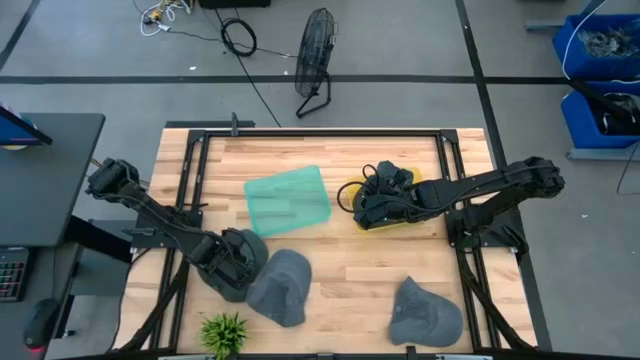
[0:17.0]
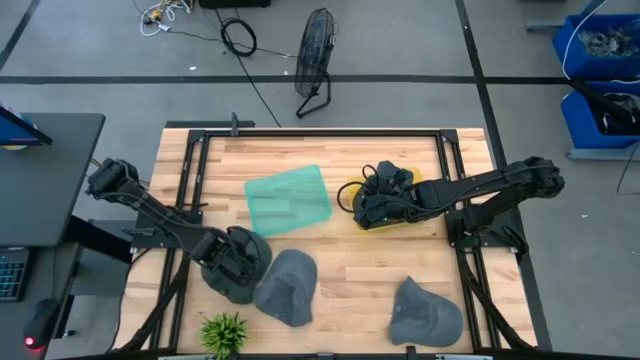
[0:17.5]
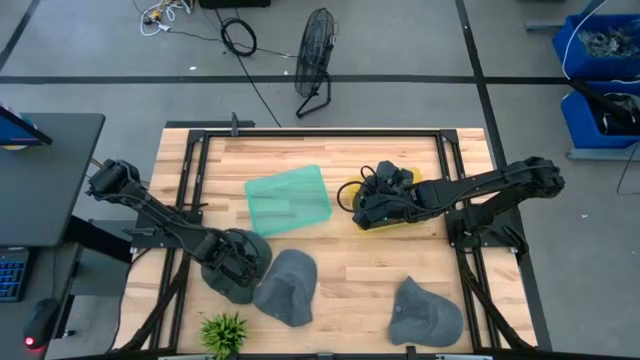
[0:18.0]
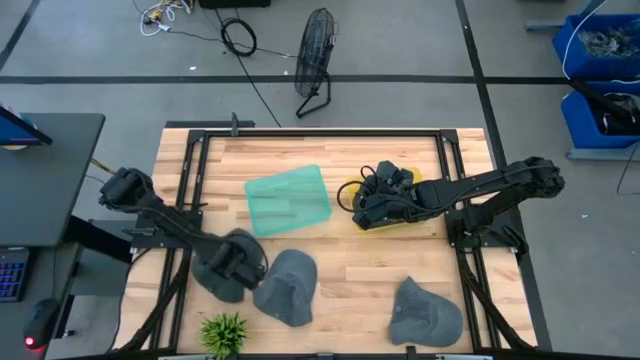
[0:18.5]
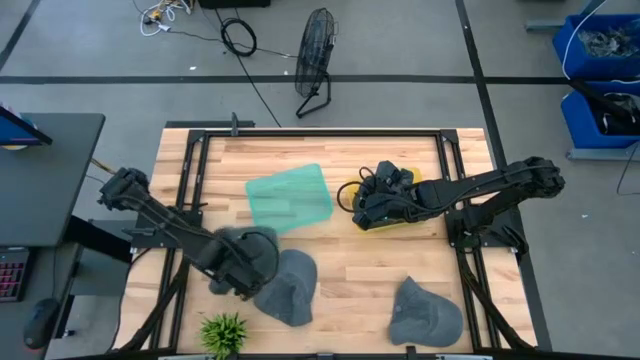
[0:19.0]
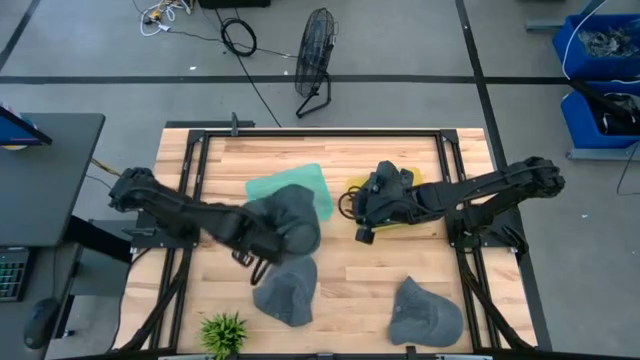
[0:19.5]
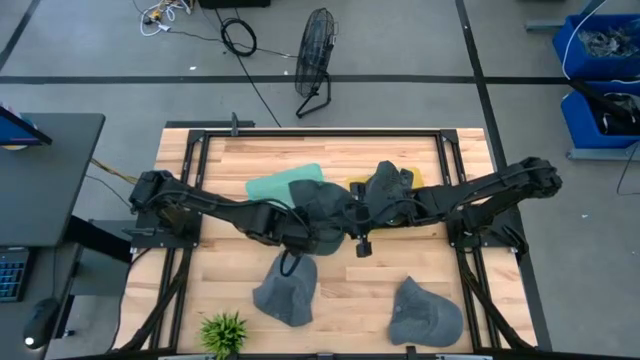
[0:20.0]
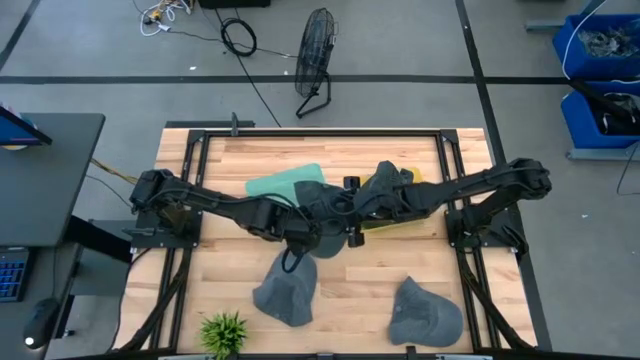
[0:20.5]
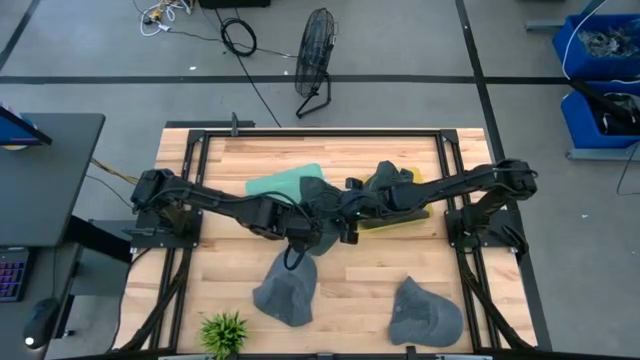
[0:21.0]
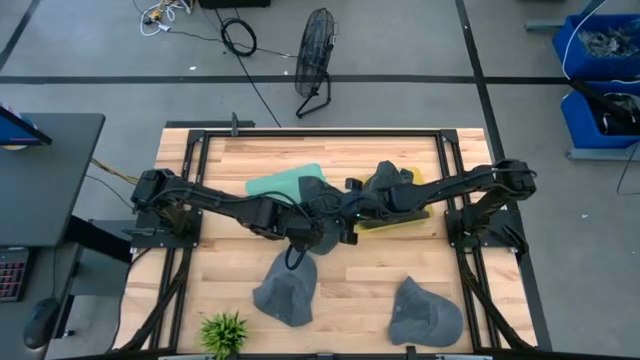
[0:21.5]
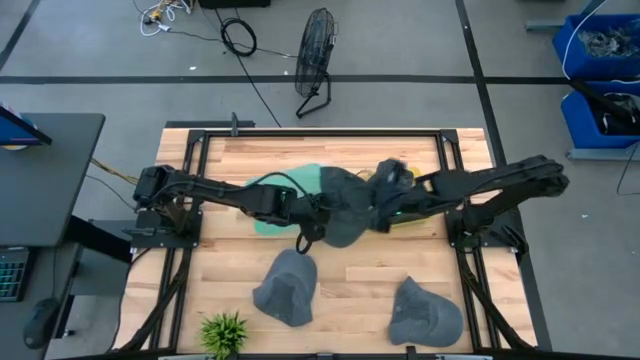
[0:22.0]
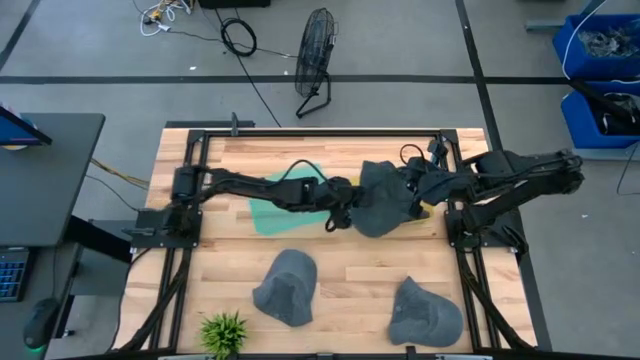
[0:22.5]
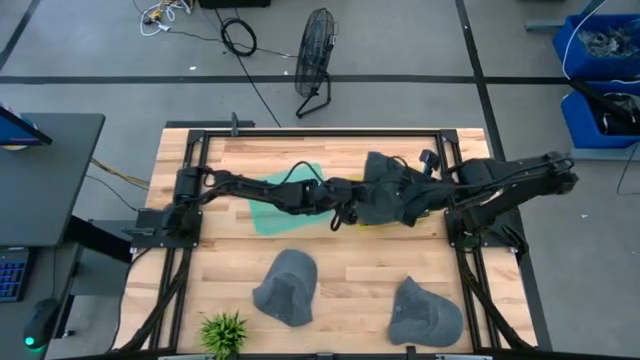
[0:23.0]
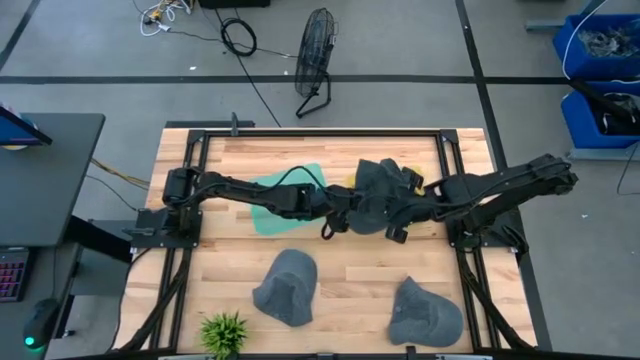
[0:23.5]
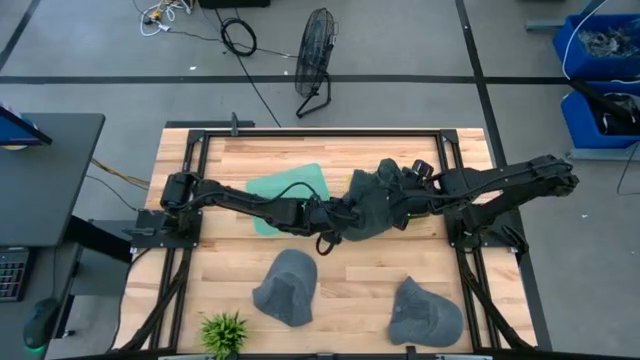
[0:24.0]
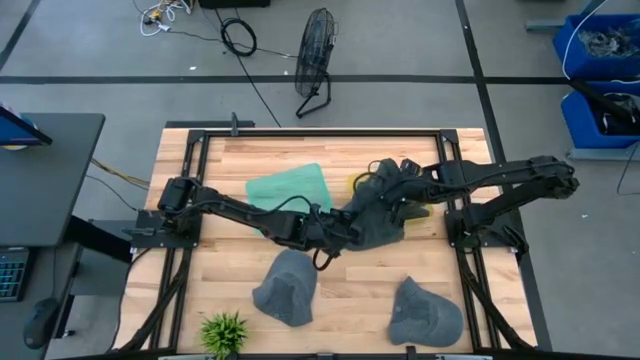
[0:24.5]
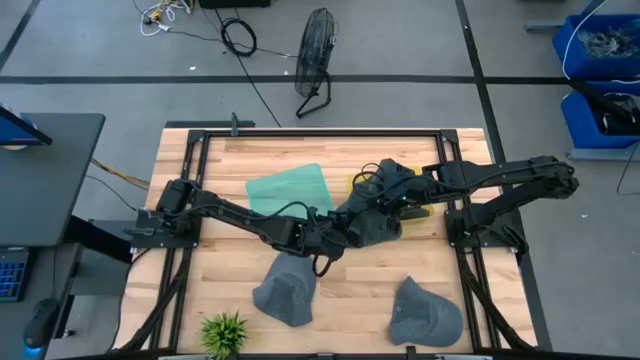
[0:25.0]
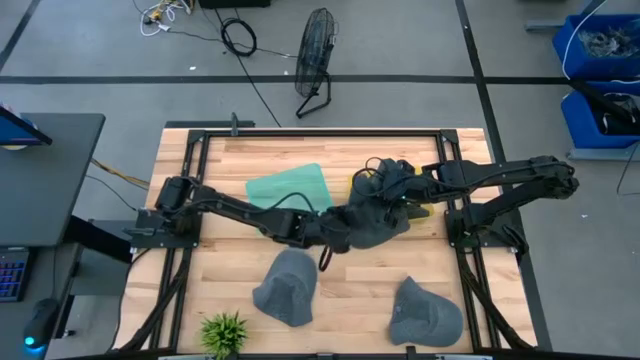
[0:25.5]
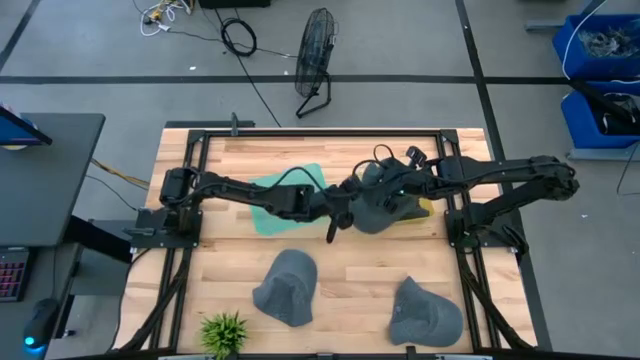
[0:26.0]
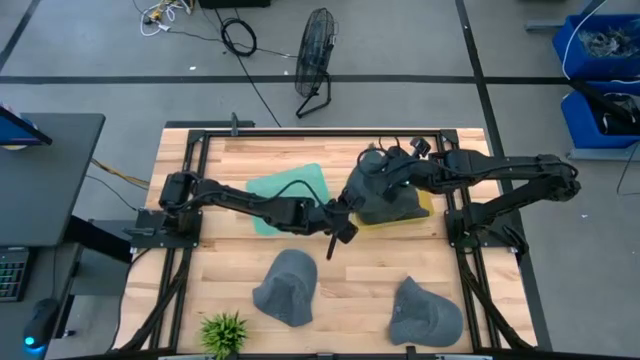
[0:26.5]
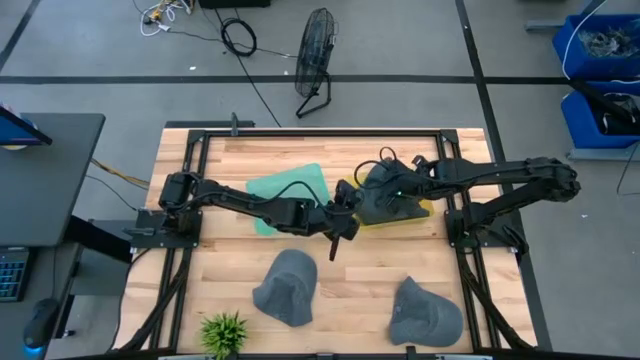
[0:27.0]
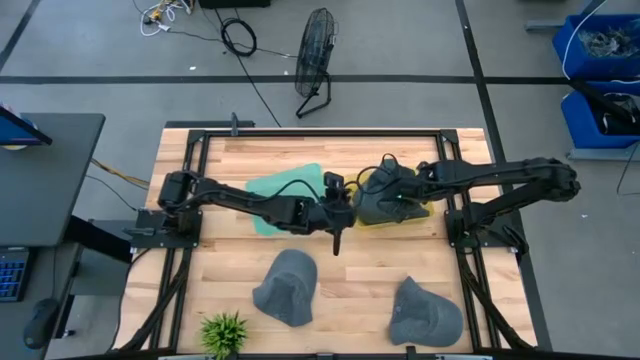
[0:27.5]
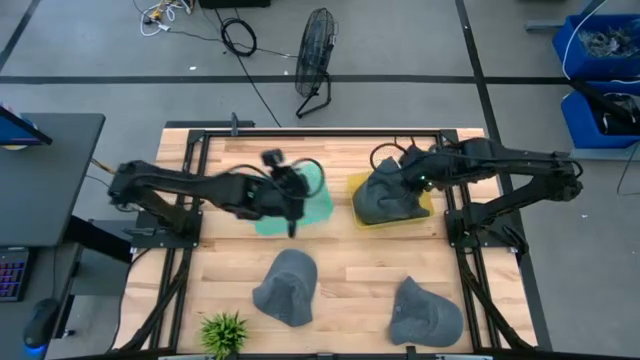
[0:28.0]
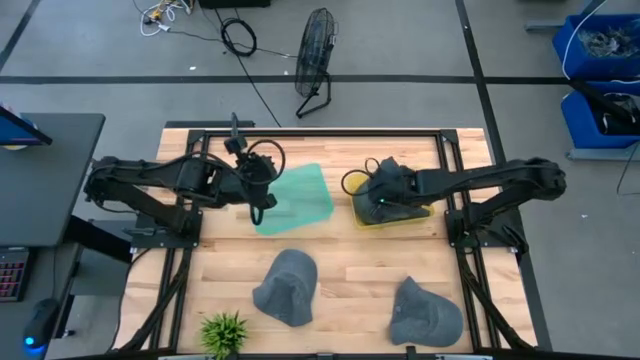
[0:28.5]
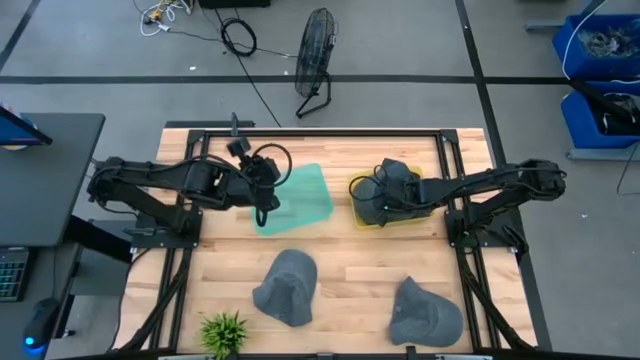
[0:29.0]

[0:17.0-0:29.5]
Task: Pick & Place hat
Put the black cap into the yellow bin

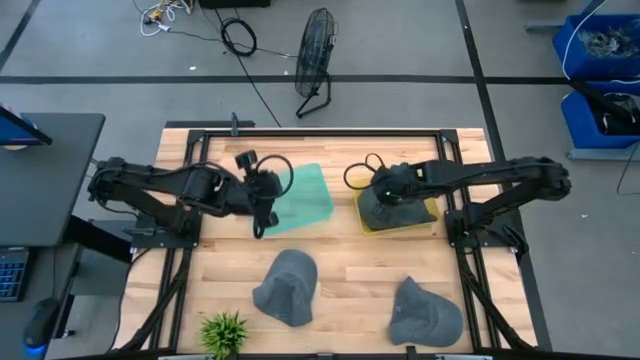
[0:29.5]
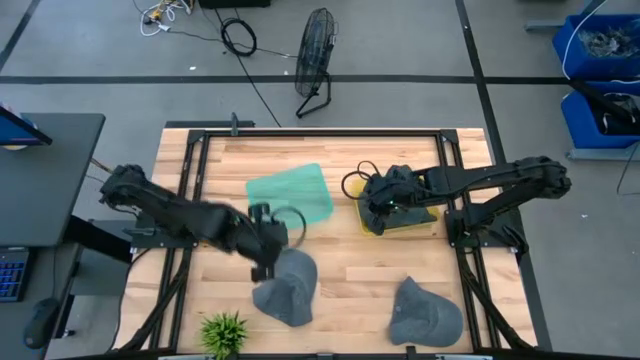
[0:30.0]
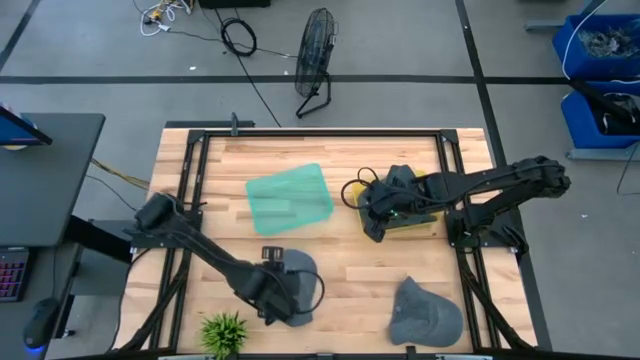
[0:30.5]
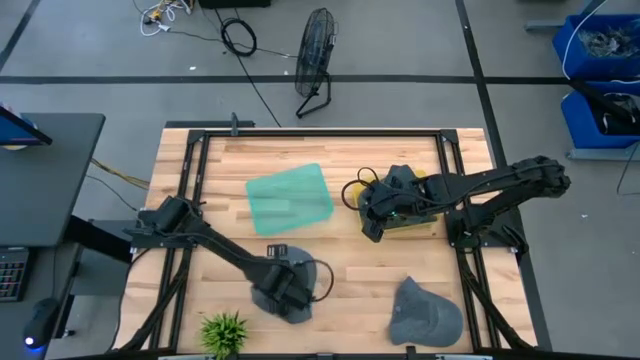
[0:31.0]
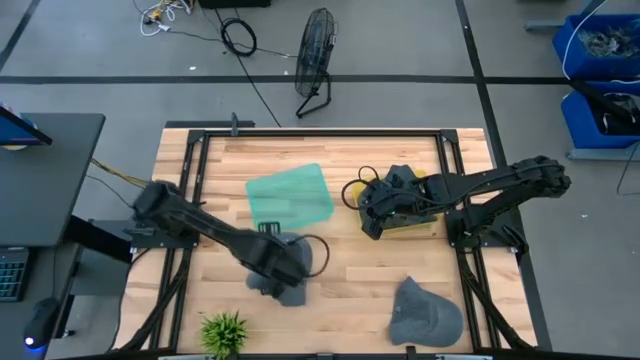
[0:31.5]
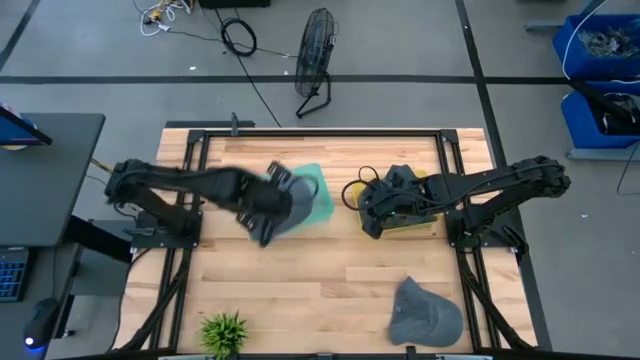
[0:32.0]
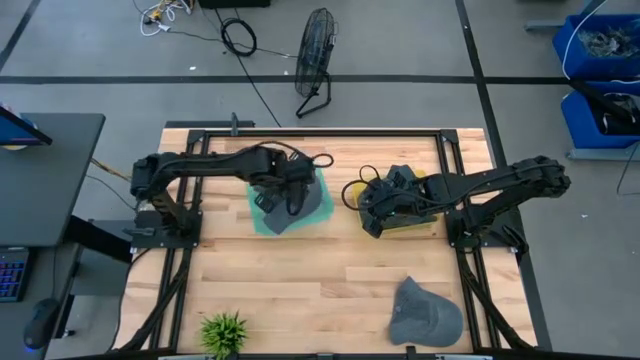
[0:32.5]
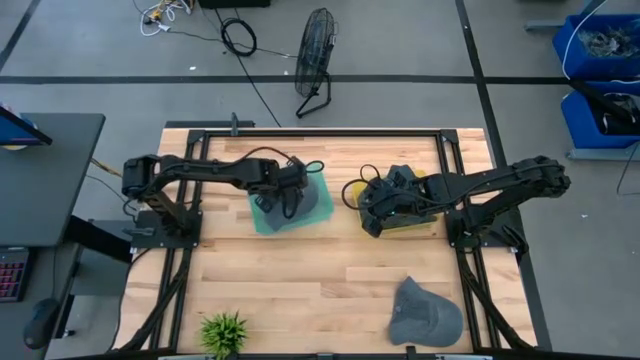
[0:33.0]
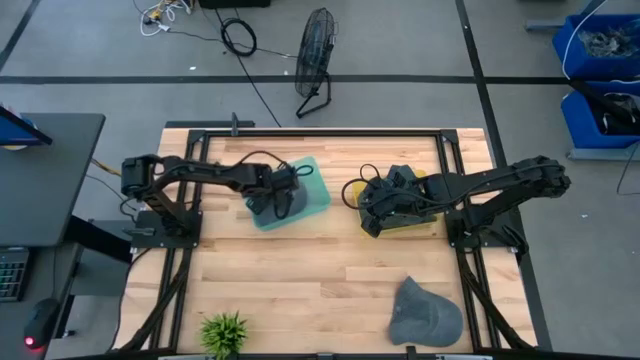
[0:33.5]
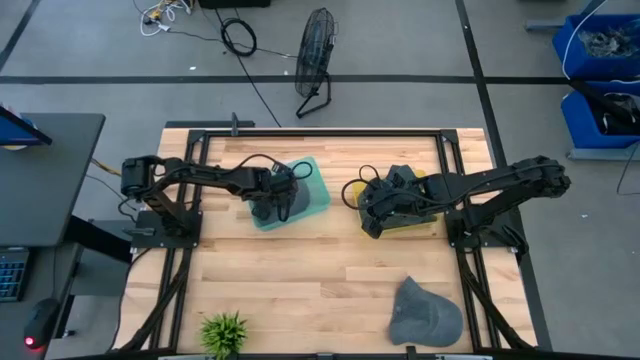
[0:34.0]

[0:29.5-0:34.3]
Put the left gray cap into the blue bin

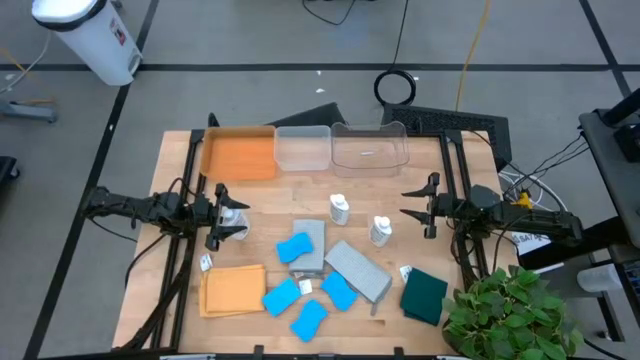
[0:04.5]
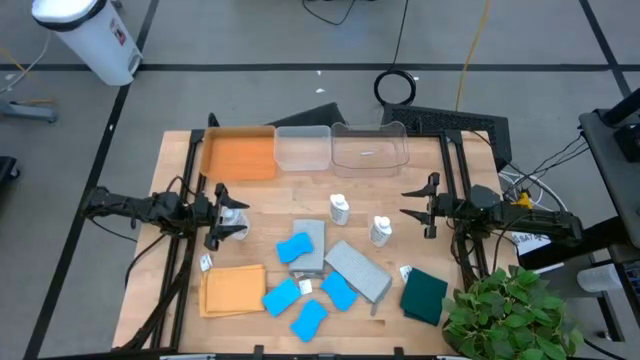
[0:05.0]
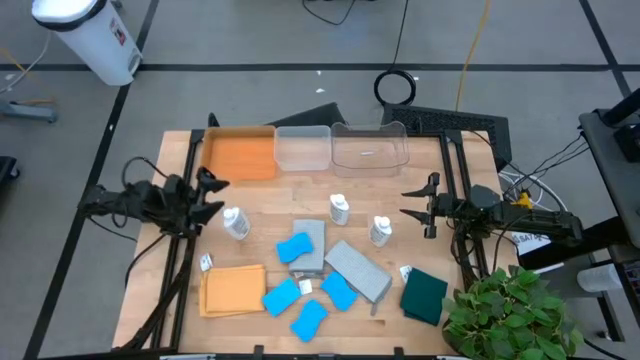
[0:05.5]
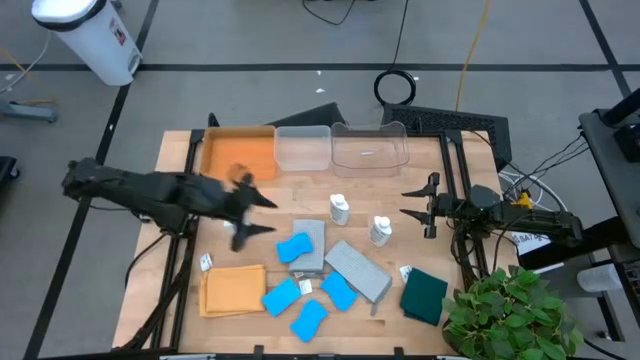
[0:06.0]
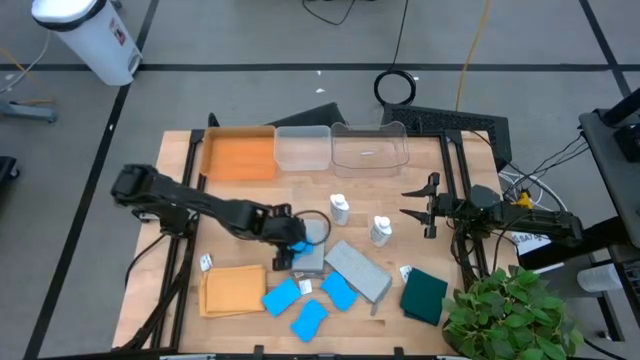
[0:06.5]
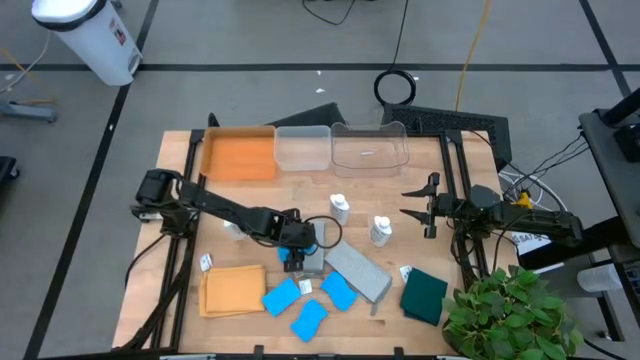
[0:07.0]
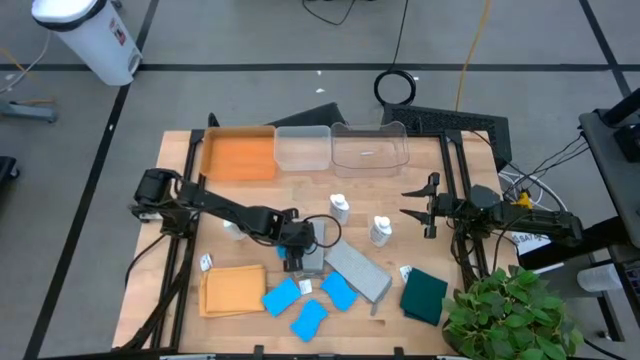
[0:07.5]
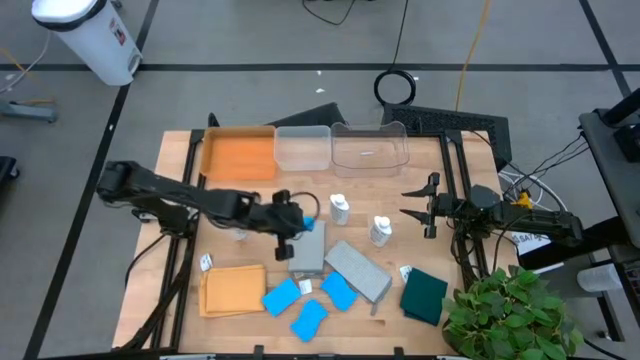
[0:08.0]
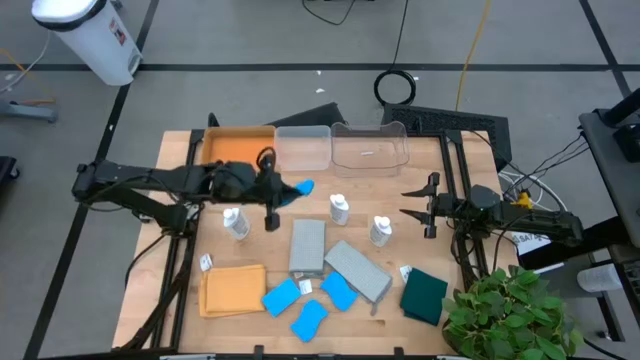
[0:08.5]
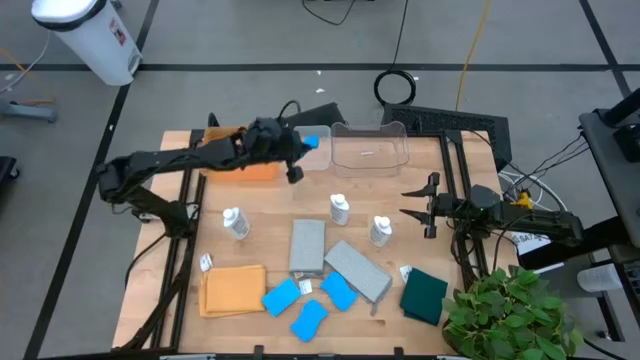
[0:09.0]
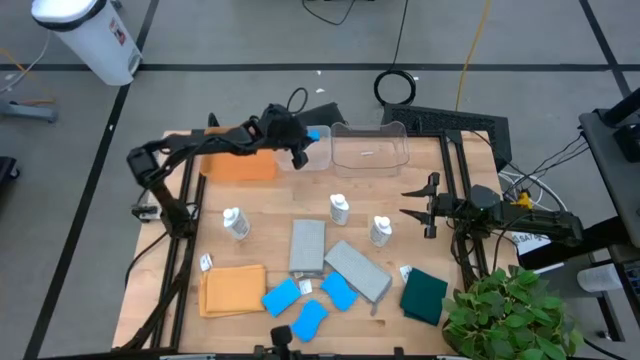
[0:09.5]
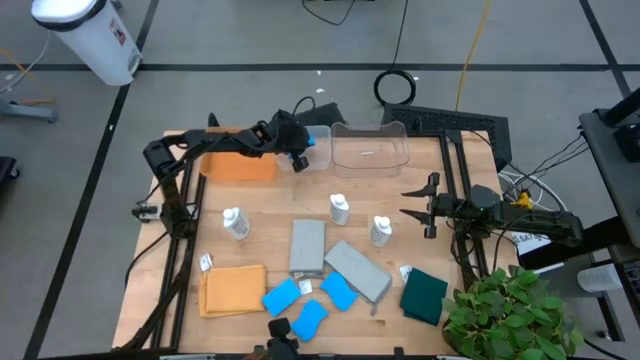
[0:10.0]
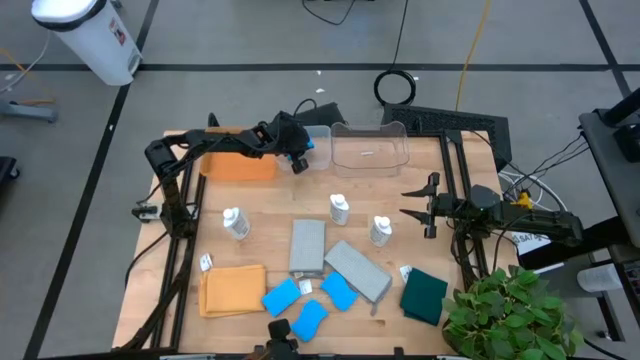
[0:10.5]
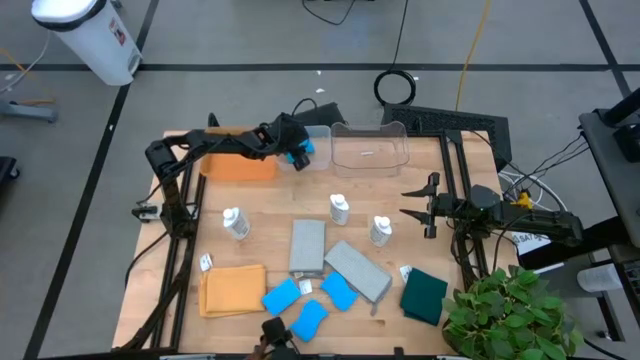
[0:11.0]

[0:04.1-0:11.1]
Task: Pick & Place Kitchen Items
Put the blue sponge into the left transparent bin
